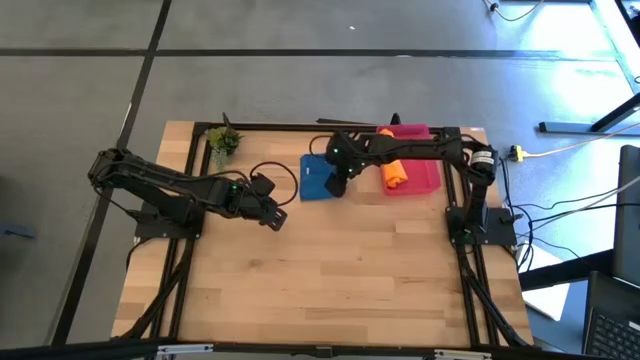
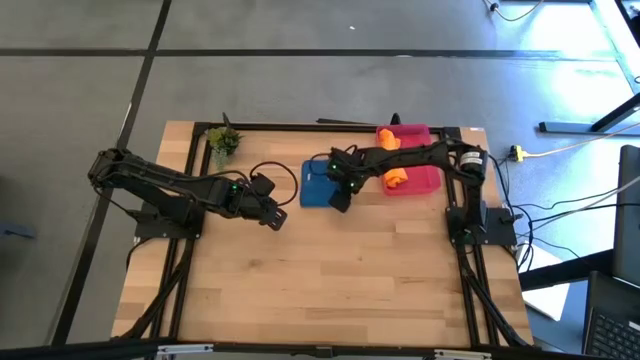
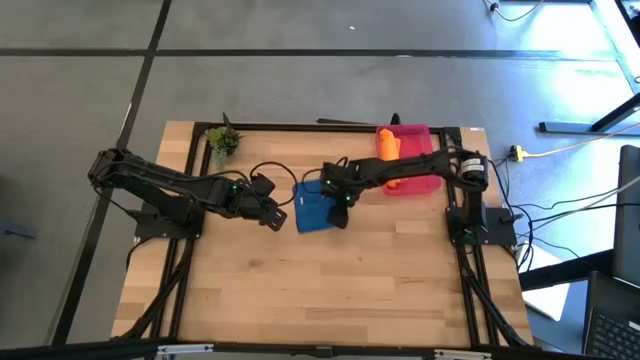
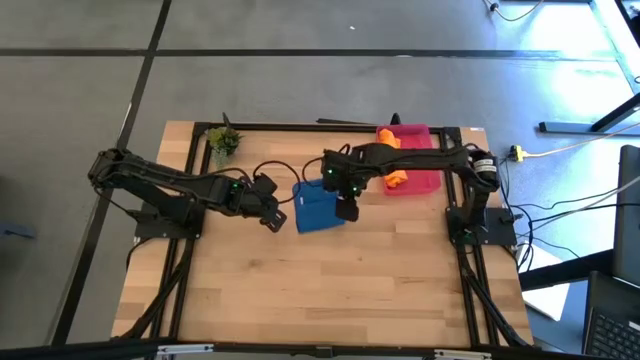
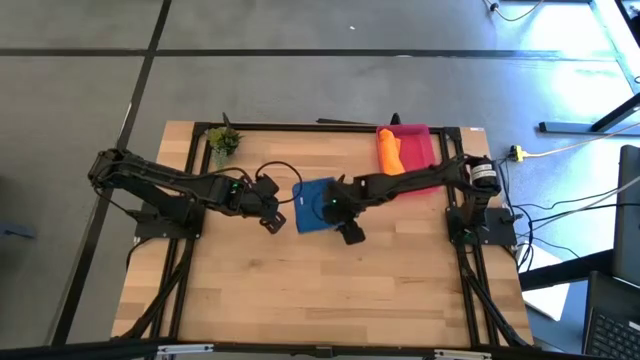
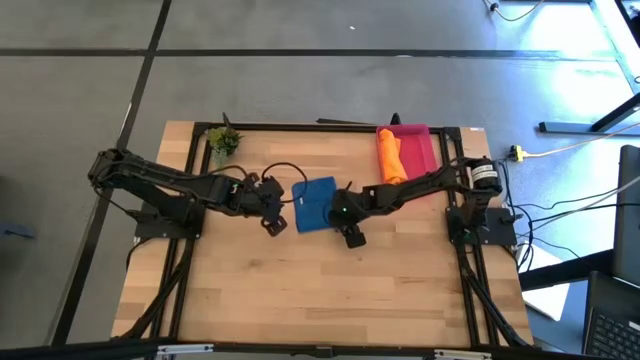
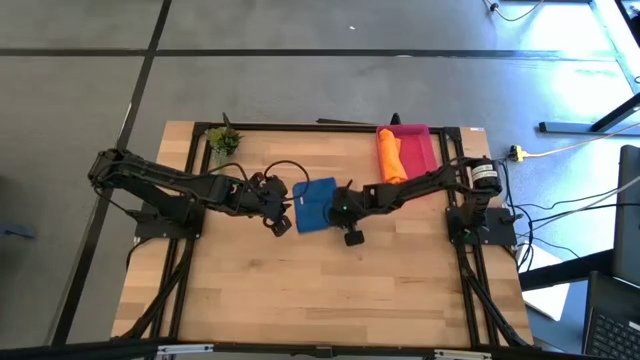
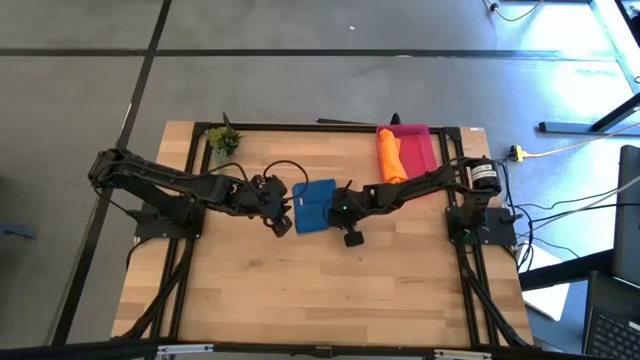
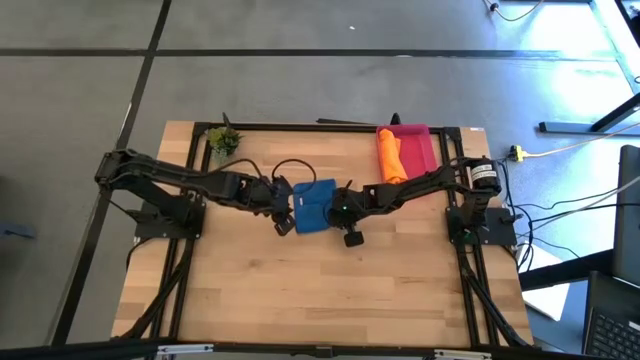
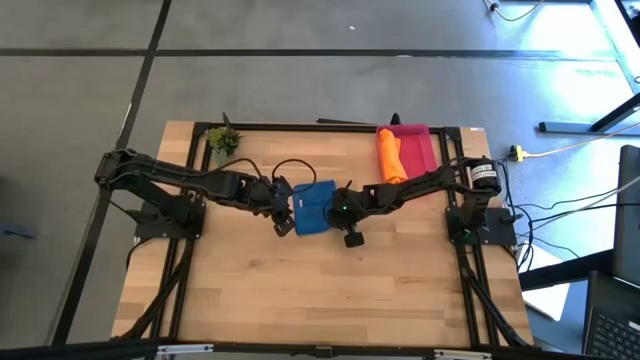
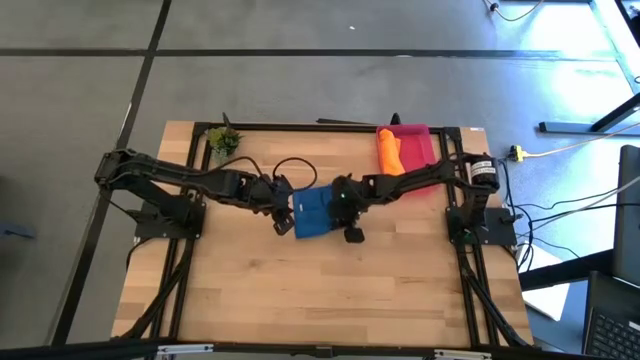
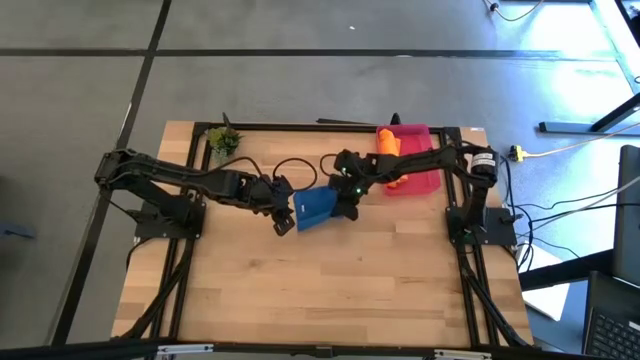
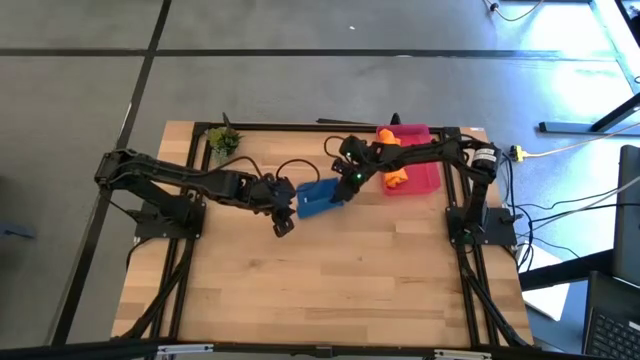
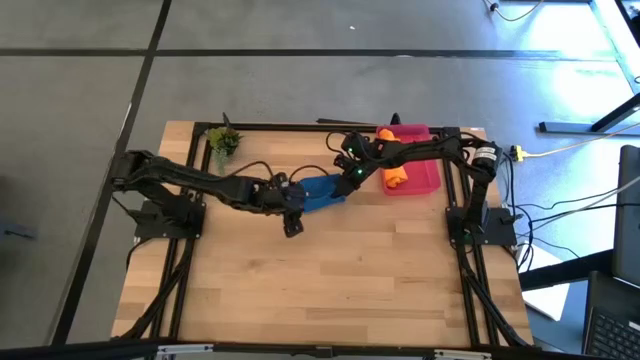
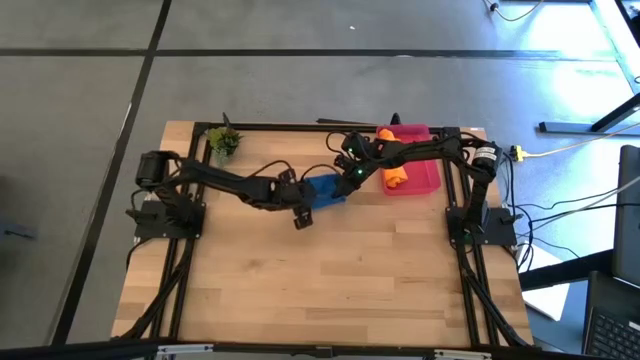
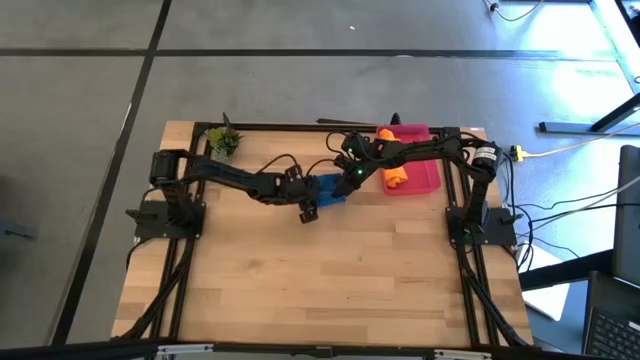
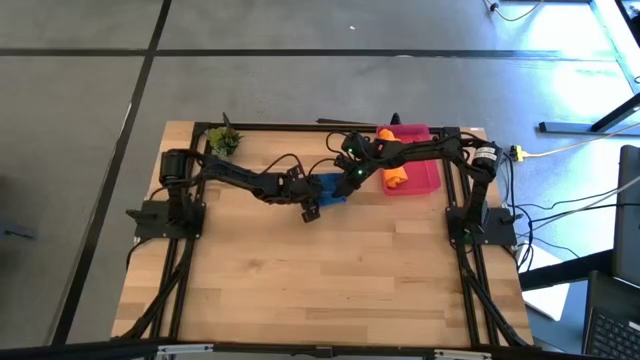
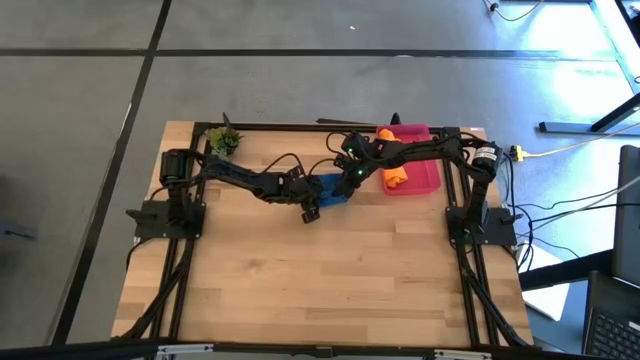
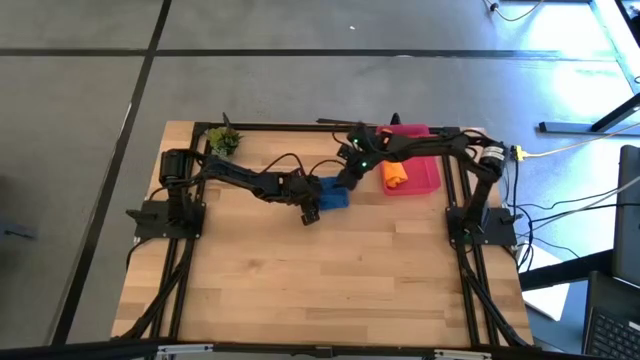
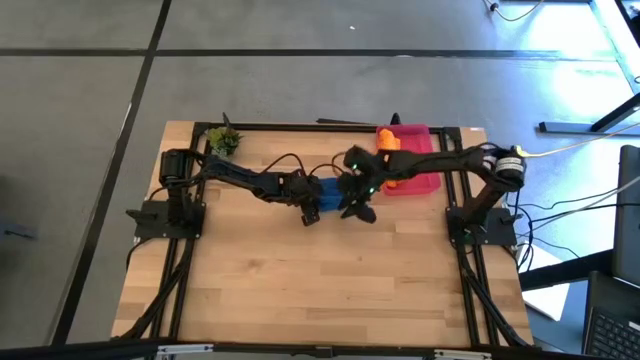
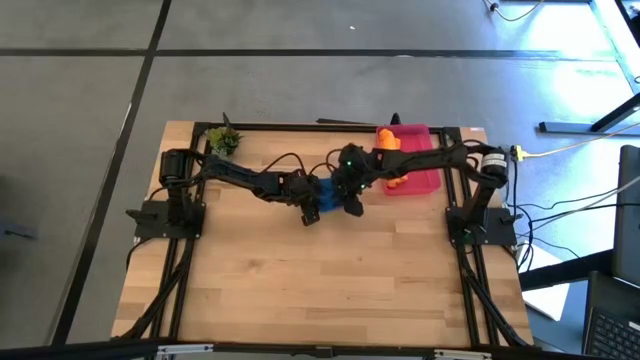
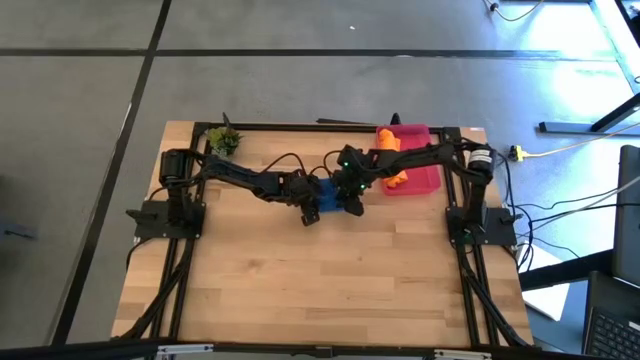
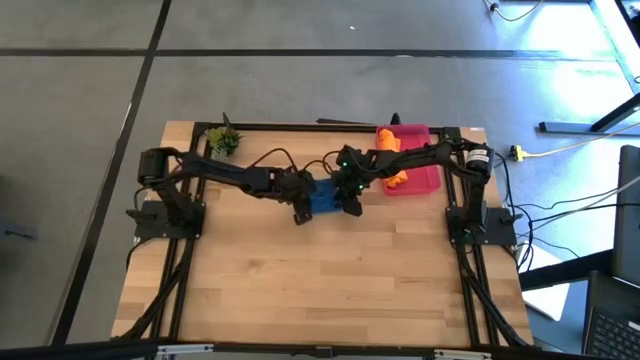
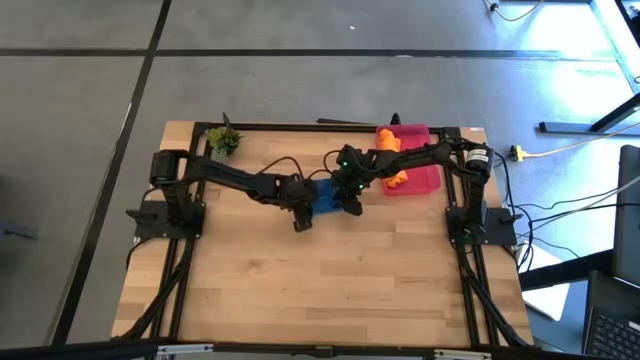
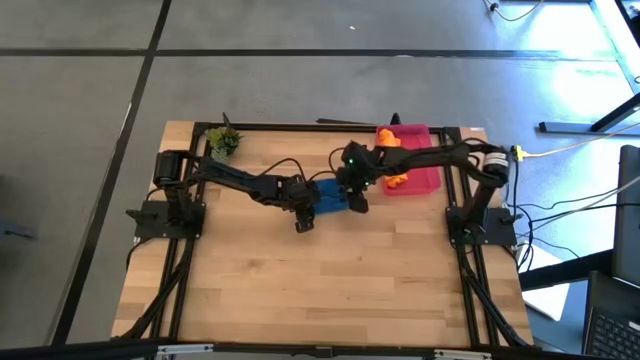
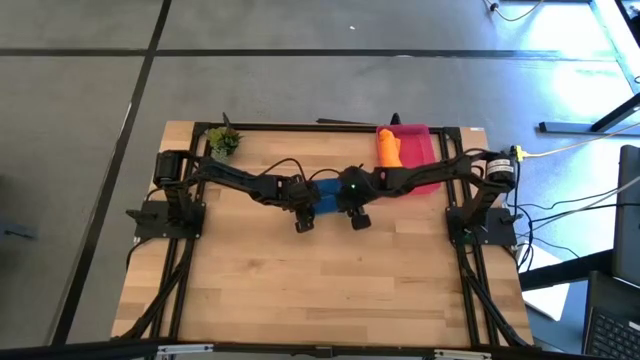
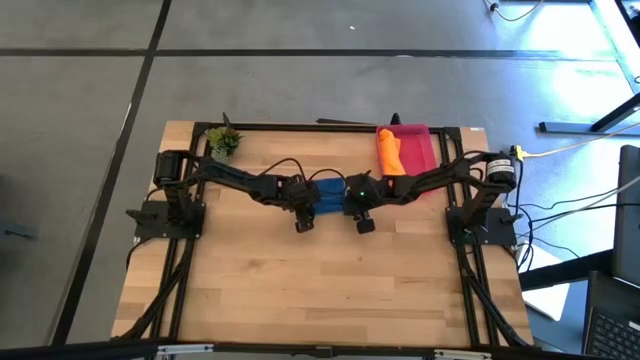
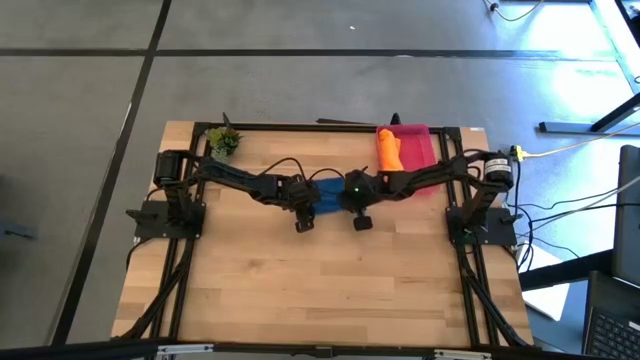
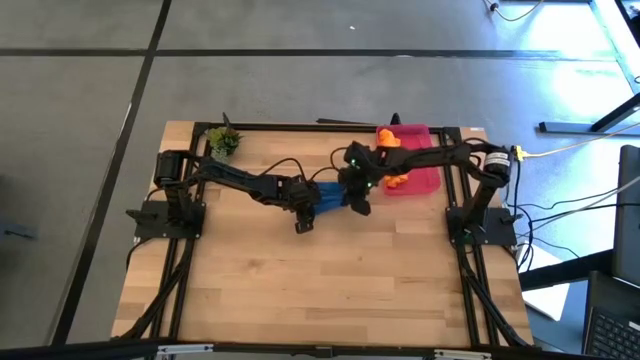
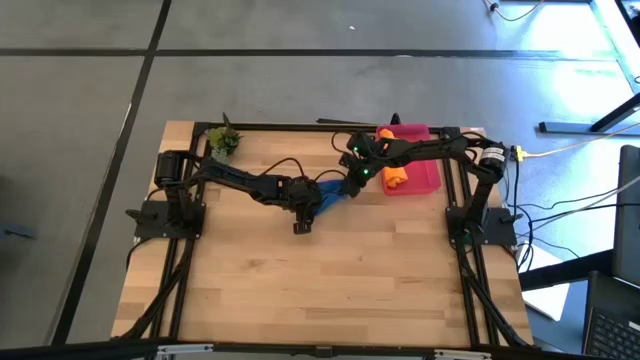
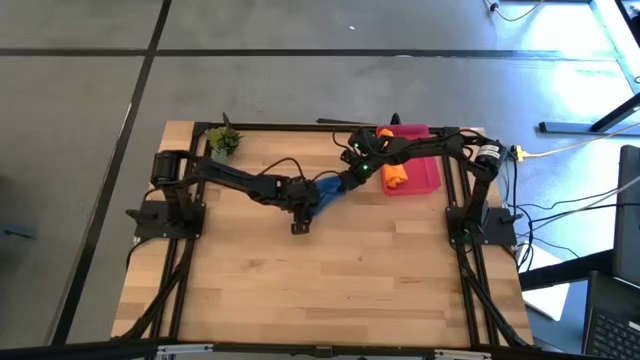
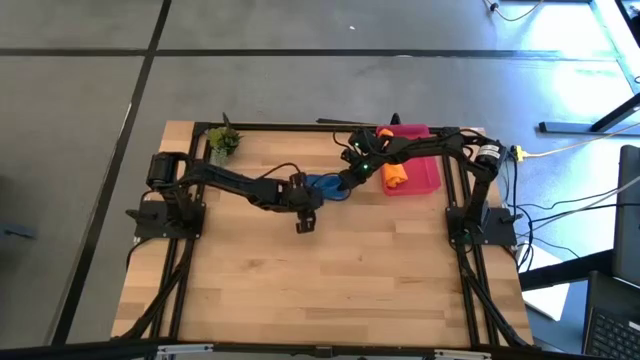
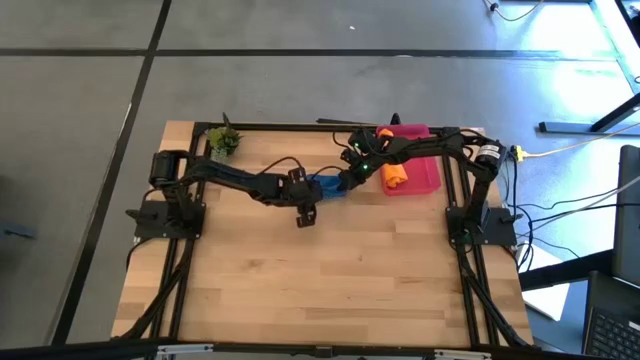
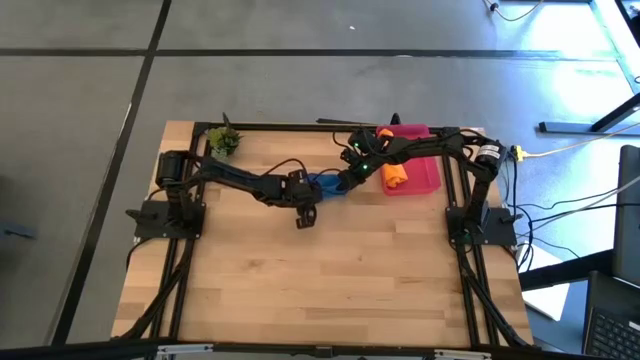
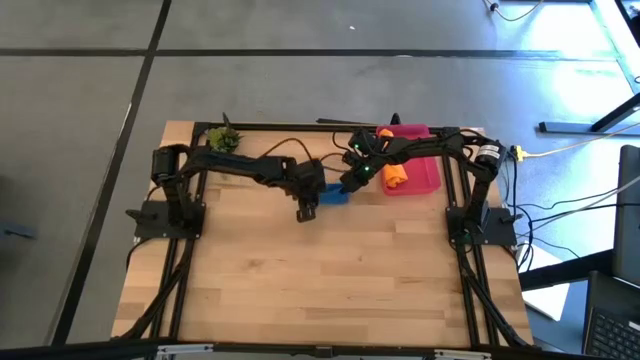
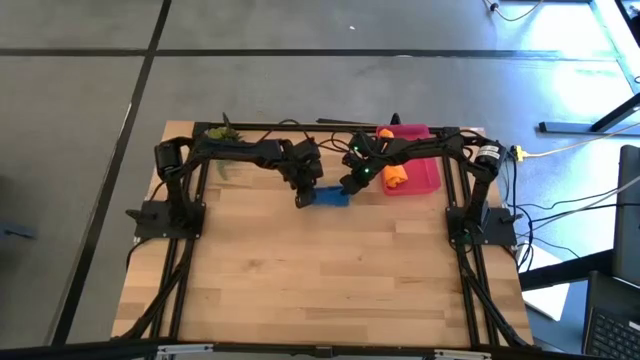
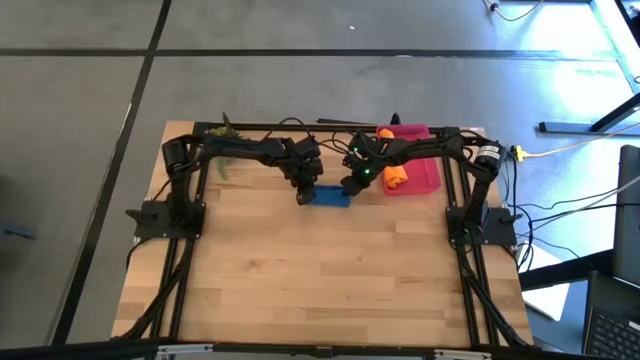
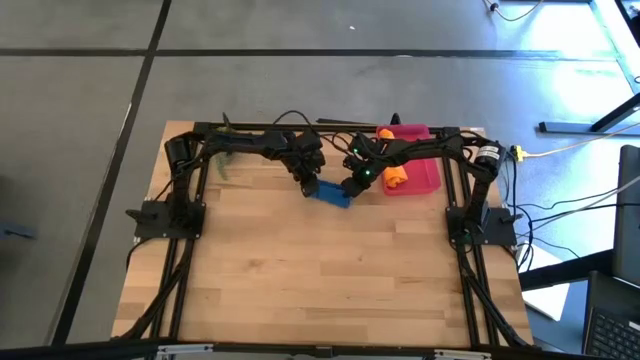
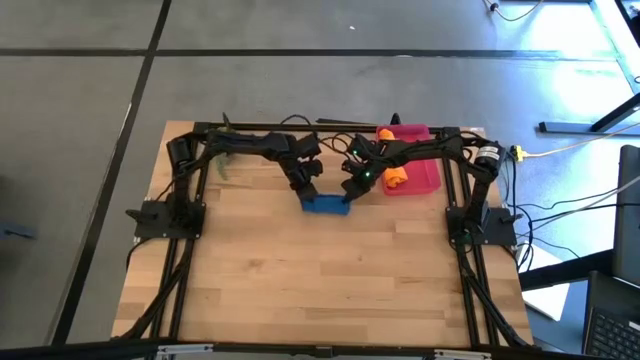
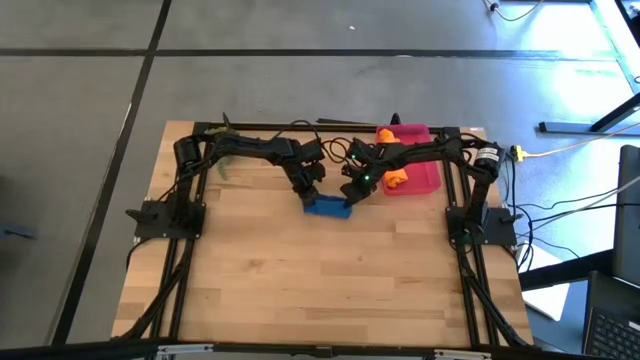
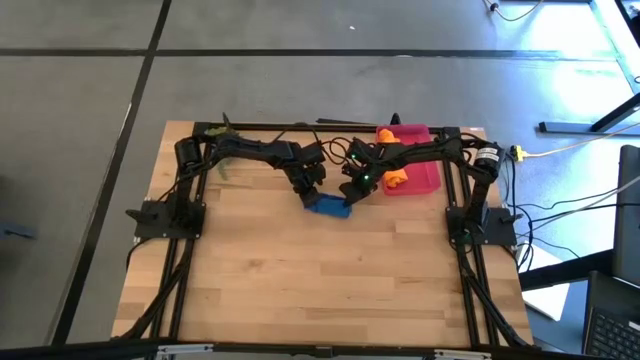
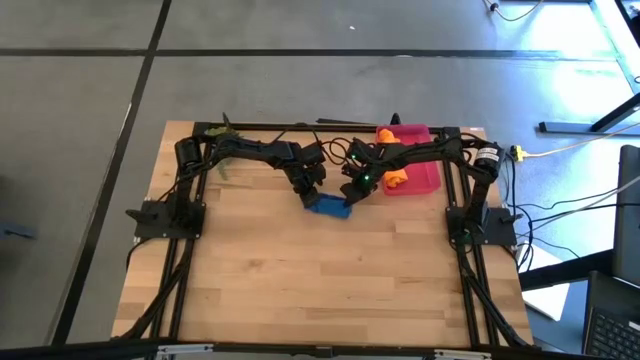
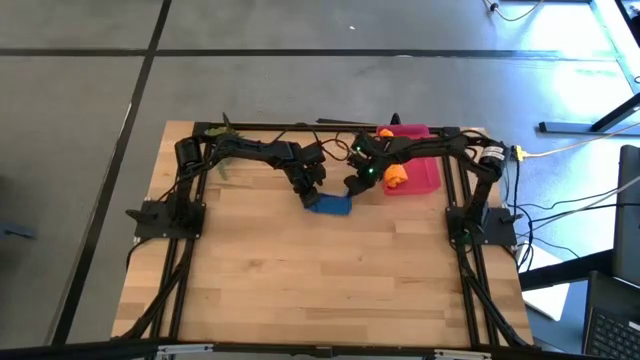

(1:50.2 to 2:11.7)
Task: Roll microfiber towels into tight, uniform cylinder then place into a basket
Roll the blue microfiber towel

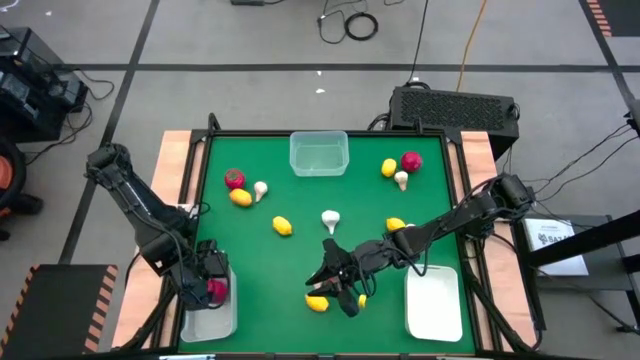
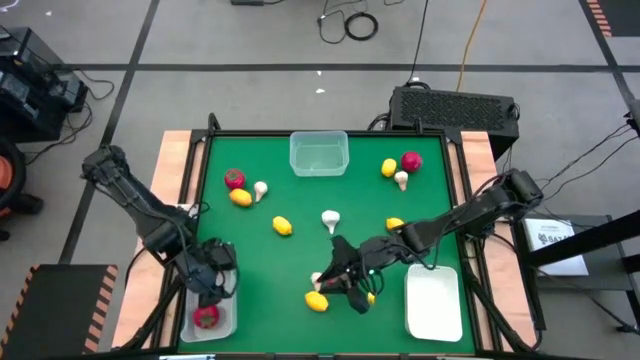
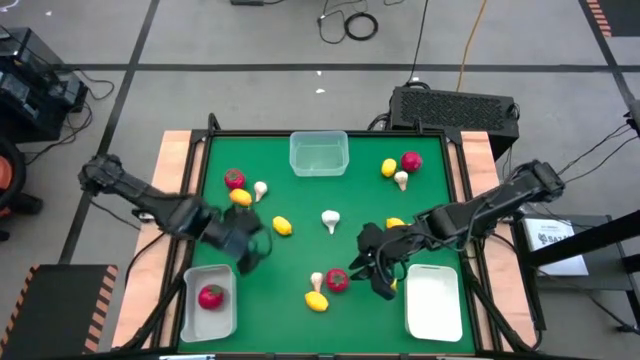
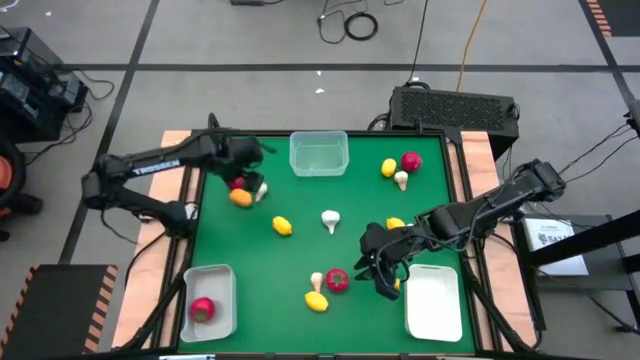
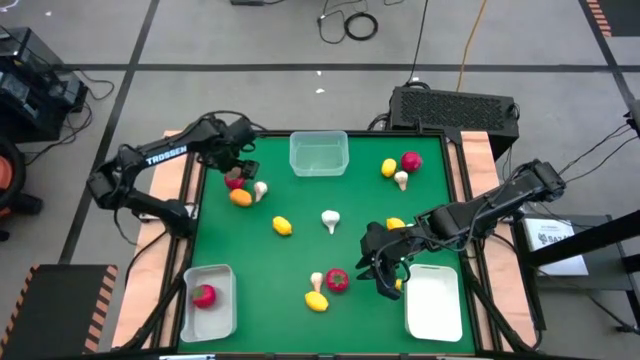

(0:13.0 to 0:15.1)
Task: Sort produce into baskets
Put the tomato into the gray bin
